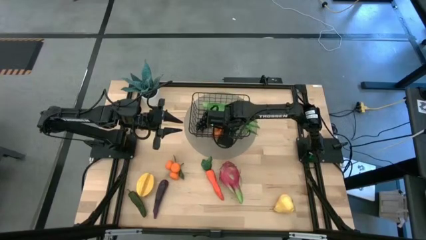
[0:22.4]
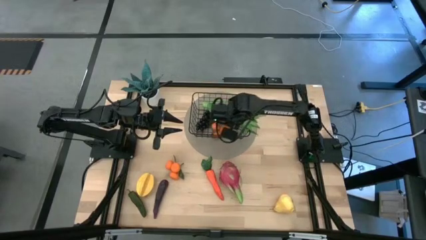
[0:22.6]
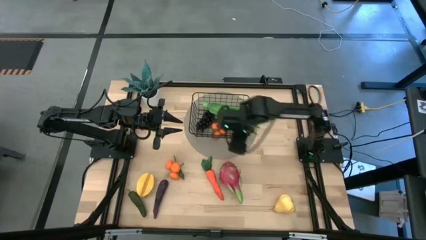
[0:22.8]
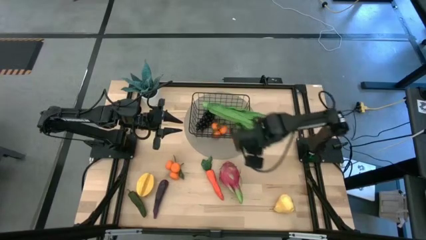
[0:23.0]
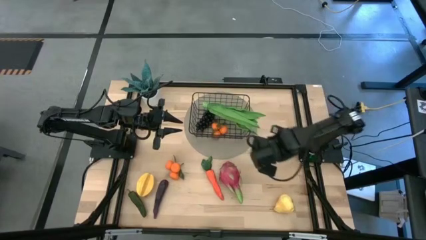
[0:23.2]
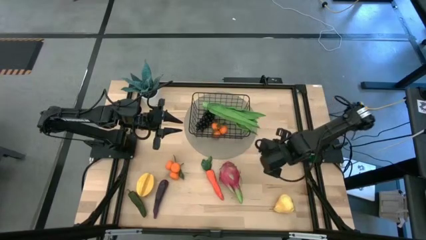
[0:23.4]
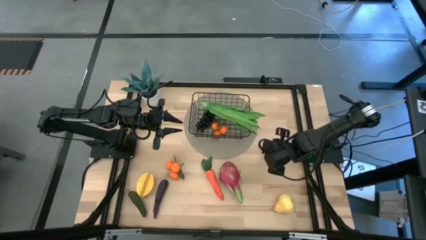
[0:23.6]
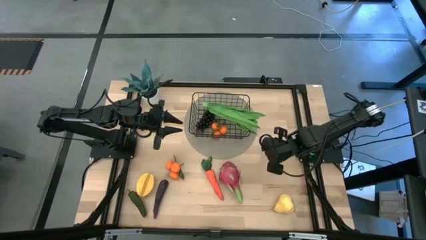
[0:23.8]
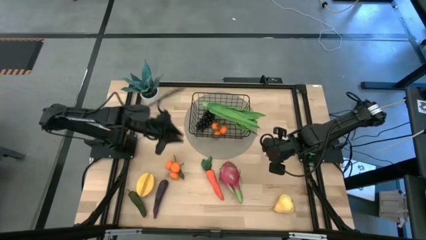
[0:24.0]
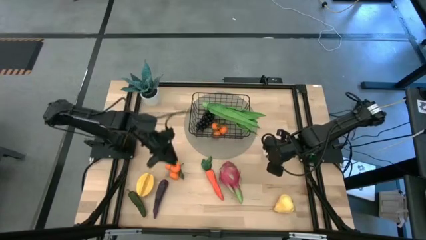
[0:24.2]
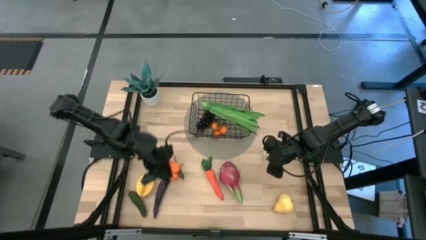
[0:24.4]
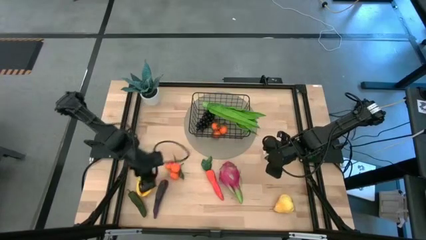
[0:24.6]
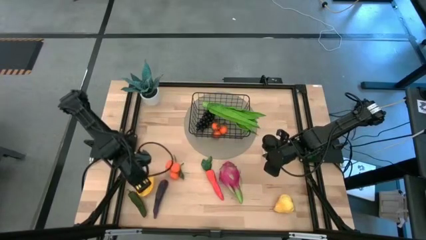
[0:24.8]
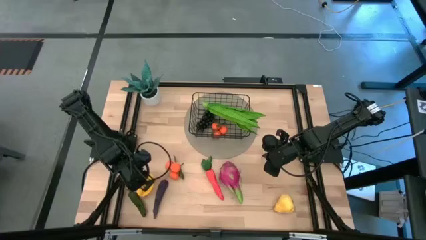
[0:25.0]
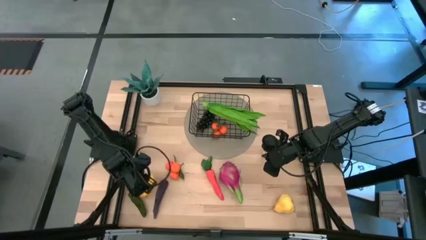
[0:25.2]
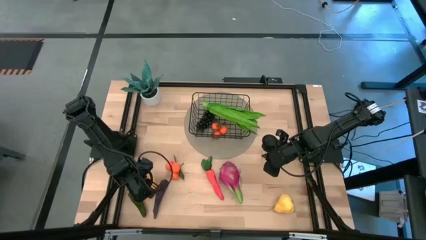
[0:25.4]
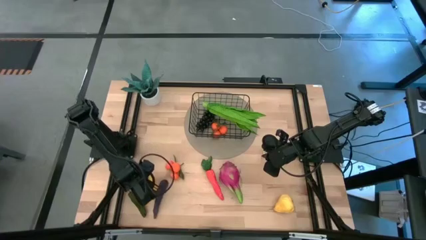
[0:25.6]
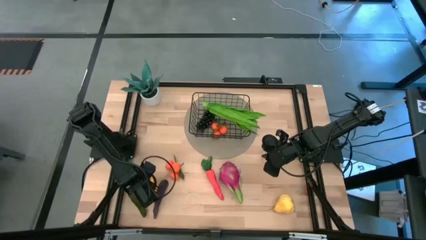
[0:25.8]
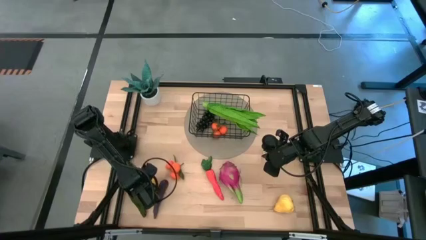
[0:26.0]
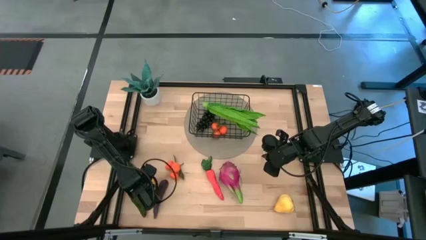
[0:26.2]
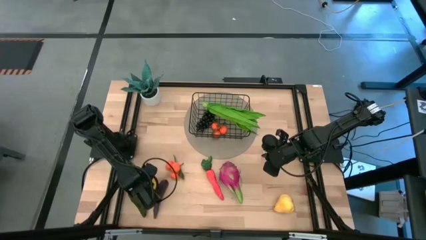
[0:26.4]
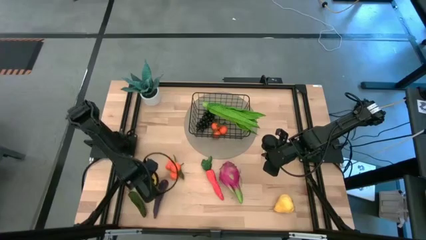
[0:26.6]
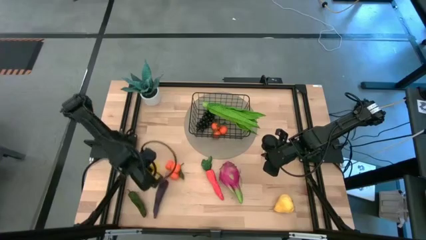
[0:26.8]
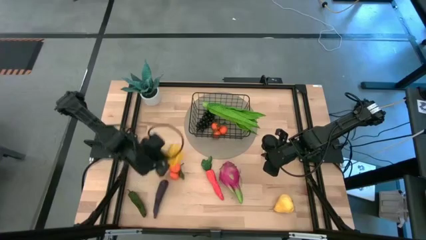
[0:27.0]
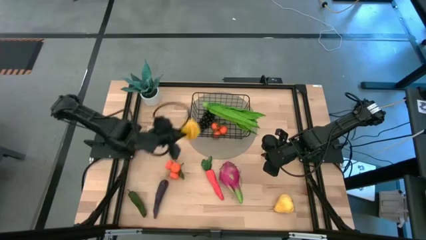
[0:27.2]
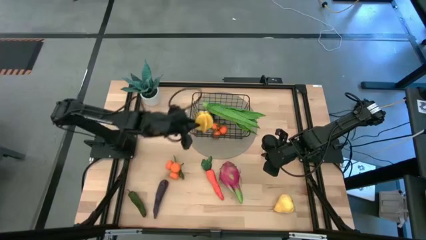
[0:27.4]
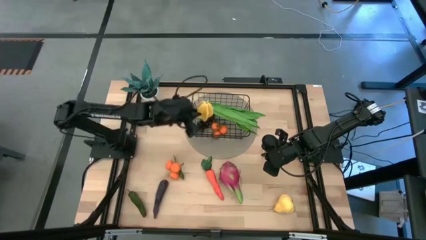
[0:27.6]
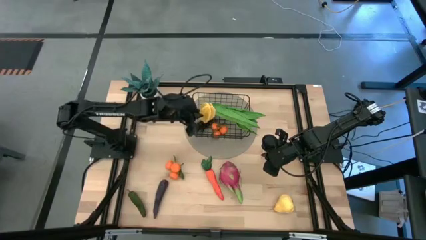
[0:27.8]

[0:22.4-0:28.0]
Task: Build produce basket
Put the starfruit into the wire basket

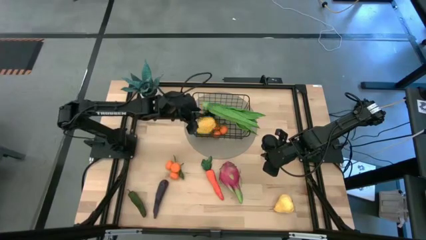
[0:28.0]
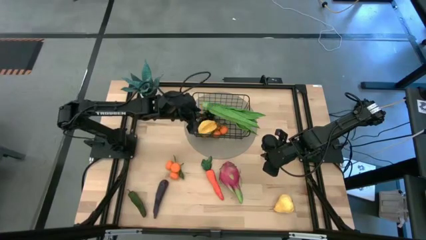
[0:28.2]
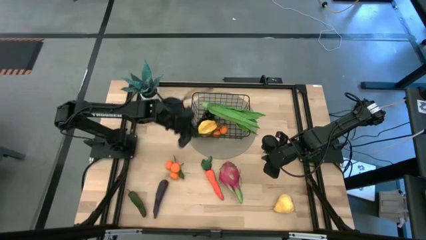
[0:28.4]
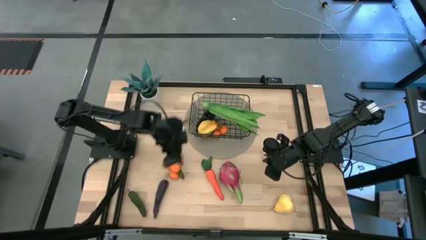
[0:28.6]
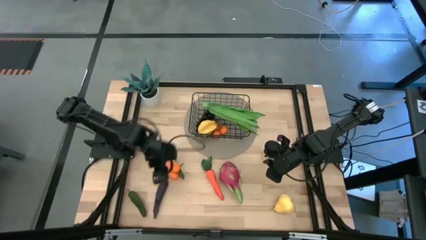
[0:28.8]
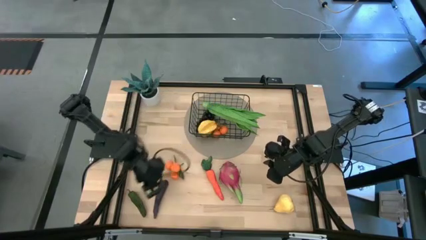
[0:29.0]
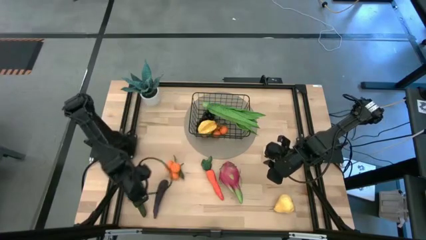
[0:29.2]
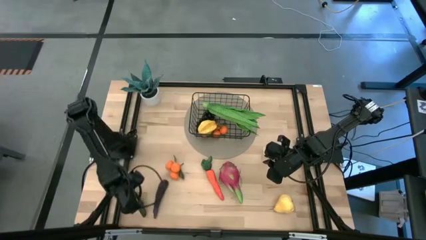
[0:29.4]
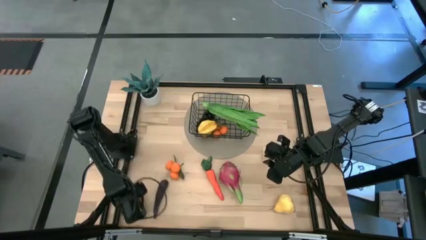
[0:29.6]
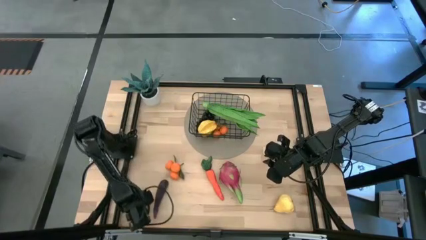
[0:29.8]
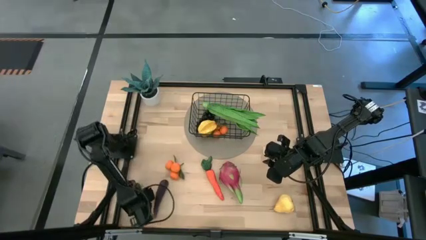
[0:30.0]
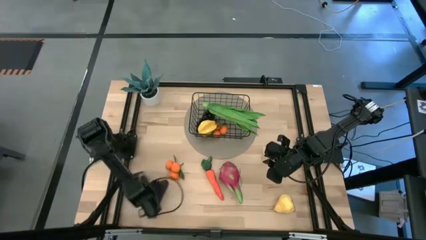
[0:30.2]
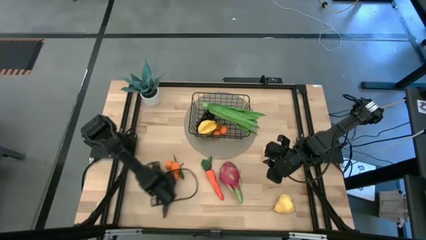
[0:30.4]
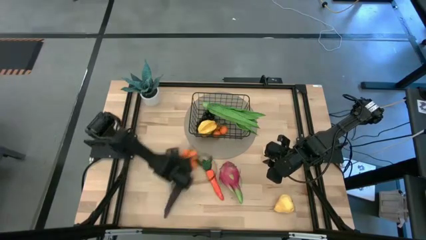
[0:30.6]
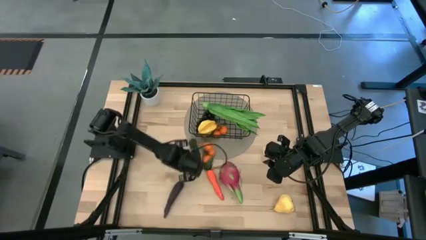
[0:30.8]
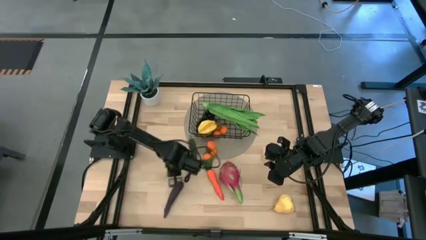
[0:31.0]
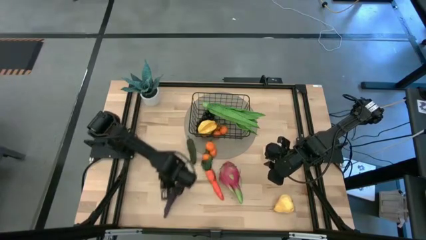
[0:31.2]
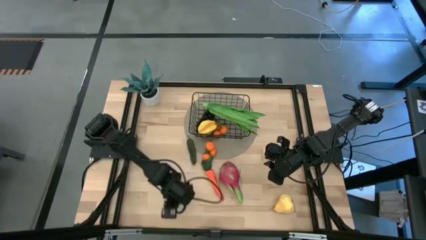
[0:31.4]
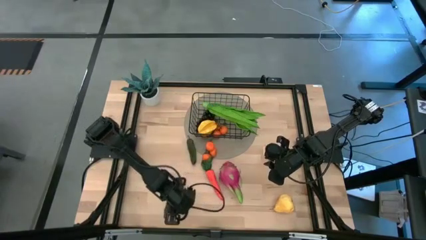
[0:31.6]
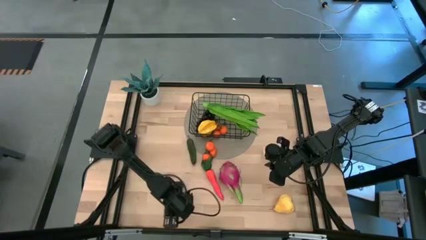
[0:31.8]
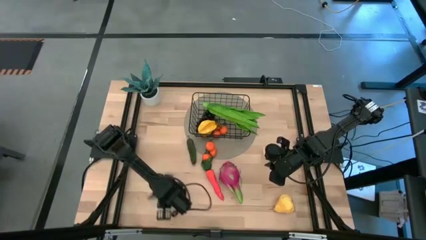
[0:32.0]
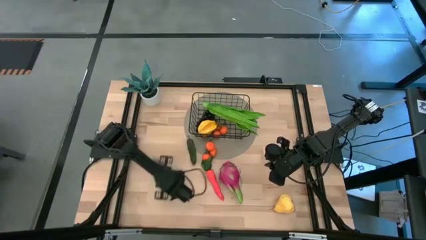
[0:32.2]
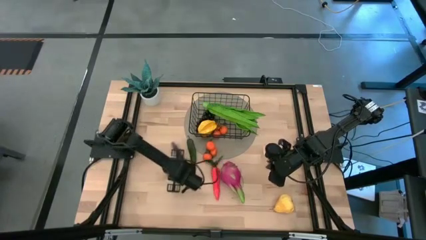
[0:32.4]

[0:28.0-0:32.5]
Move the produce to the center of the table

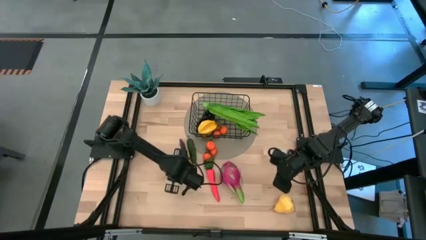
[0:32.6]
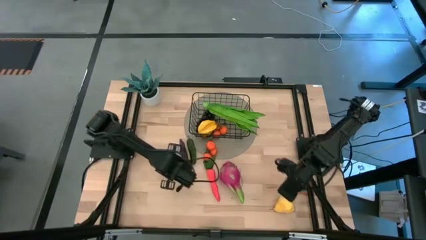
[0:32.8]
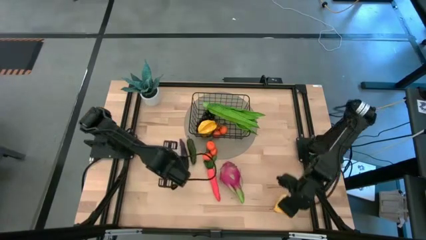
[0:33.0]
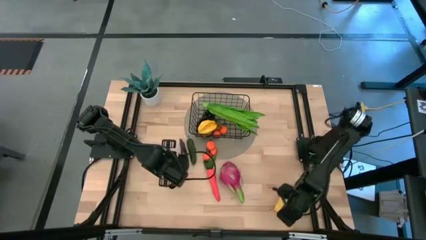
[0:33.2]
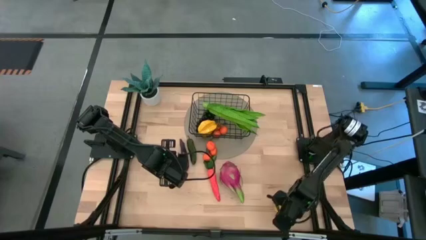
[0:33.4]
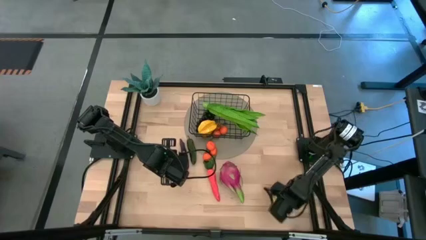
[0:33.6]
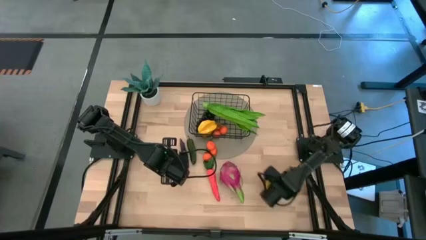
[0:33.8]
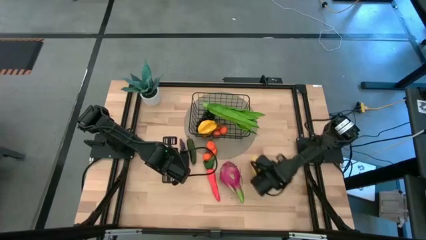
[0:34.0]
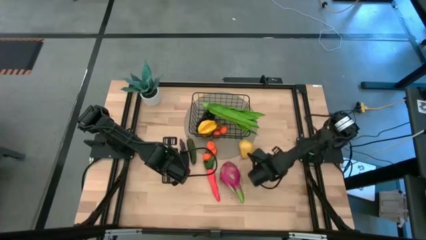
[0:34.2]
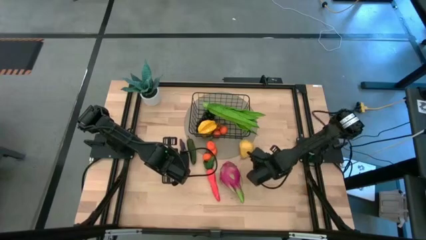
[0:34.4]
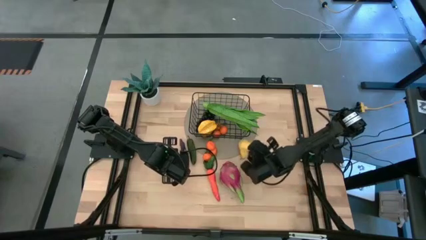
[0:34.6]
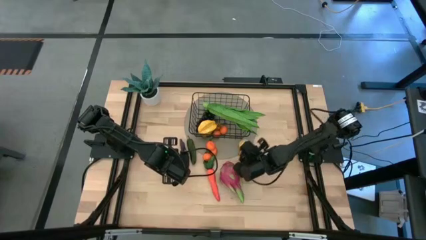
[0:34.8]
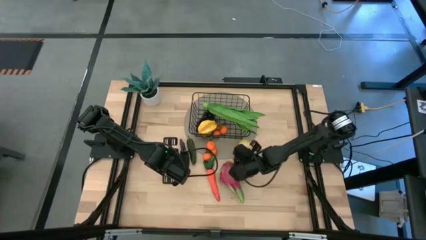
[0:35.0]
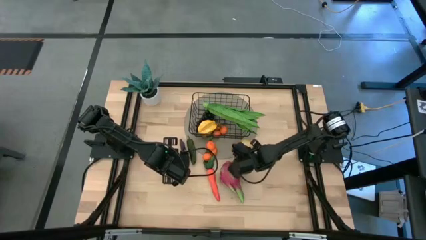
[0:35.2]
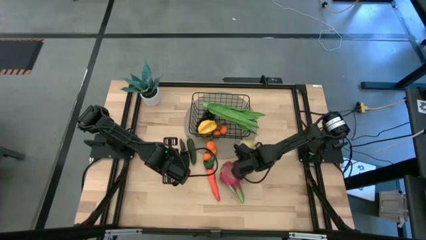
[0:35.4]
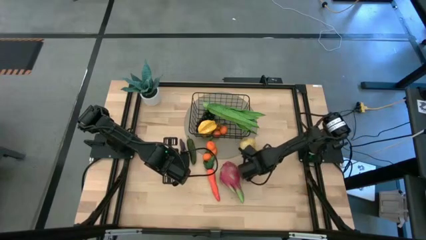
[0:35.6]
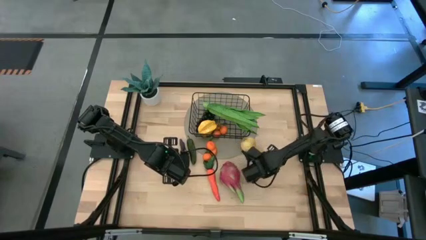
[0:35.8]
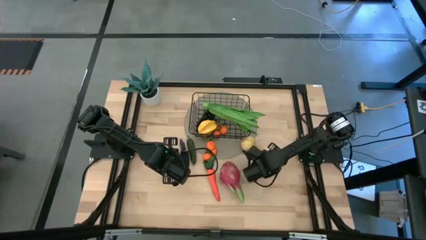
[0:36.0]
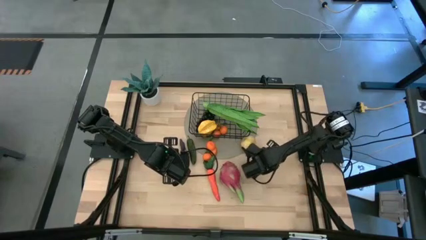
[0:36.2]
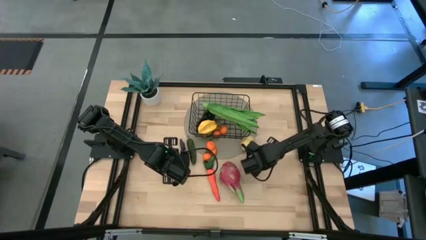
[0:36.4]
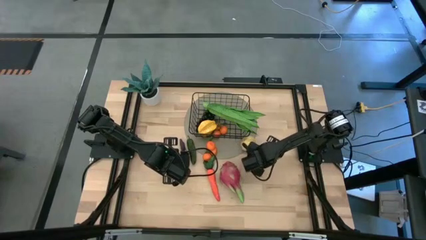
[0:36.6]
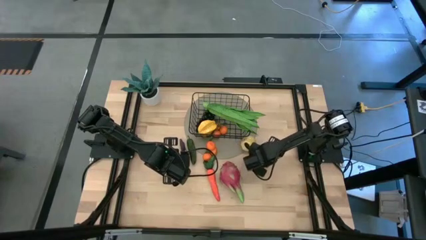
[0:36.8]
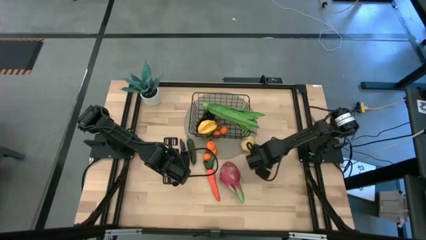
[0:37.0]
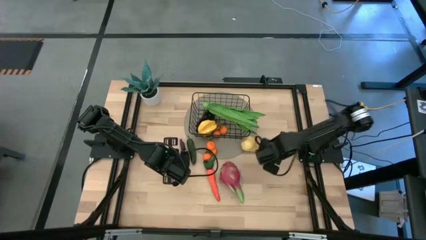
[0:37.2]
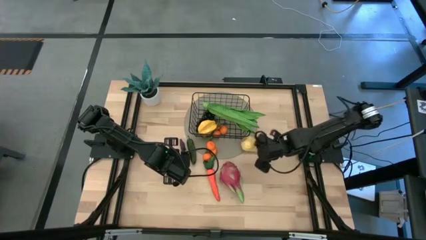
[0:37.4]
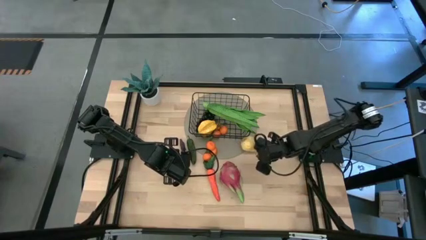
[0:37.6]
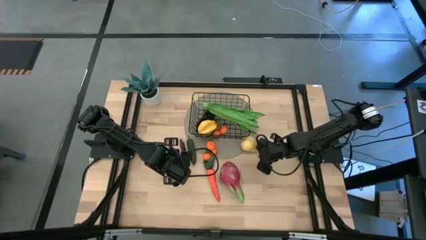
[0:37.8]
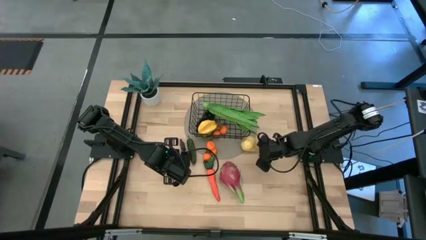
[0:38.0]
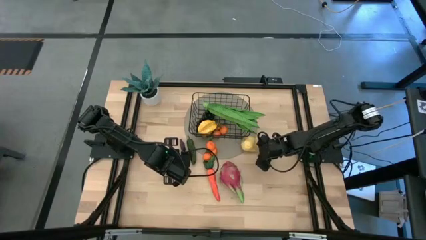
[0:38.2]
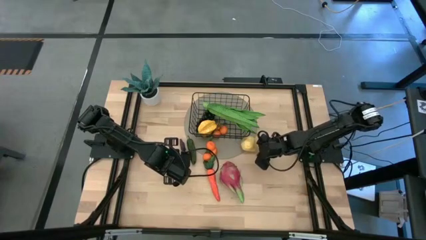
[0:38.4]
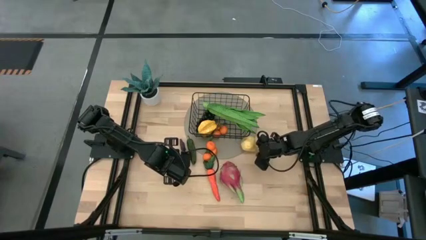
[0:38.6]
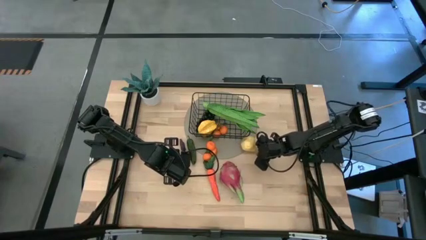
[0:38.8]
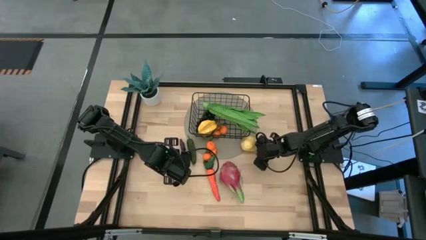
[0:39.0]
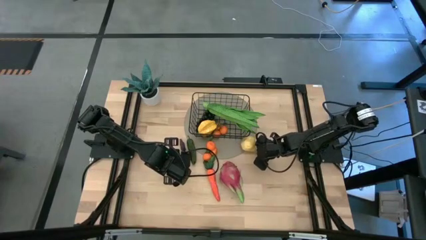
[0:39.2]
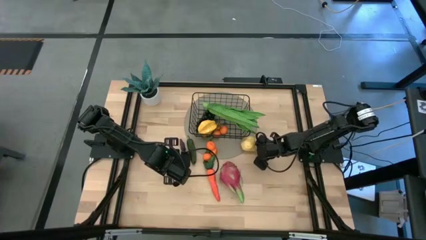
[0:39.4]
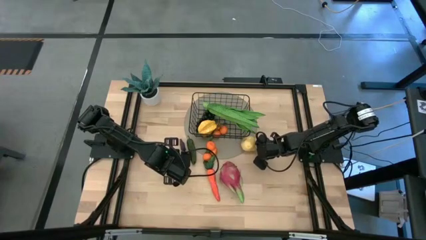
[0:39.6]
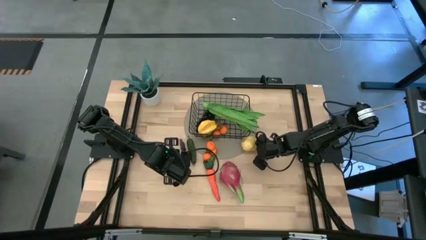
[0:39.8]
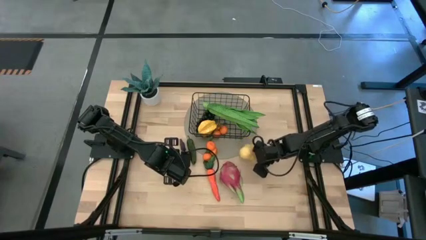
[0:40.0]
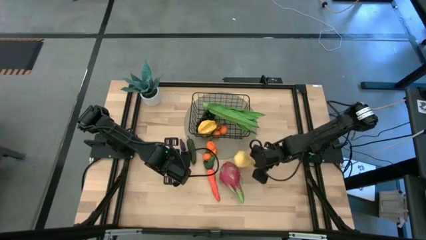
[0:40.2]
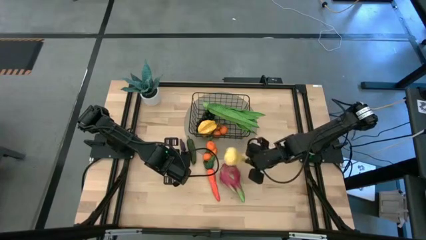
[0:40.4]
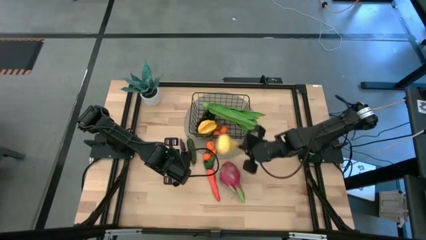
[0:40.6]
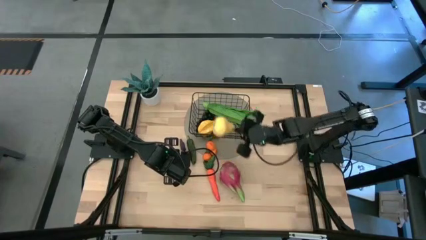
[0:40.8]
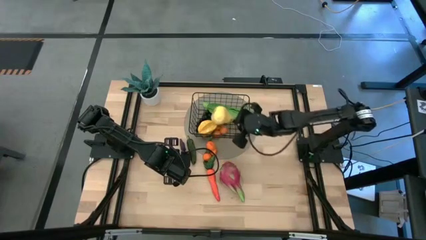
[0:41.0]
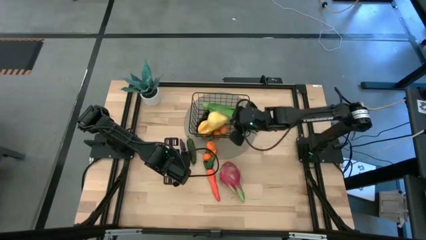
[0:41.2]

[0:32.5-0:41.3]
Put the pear into the wire basket
